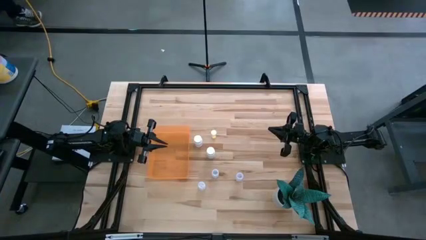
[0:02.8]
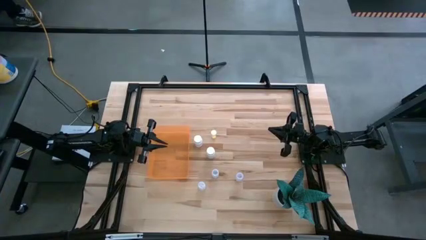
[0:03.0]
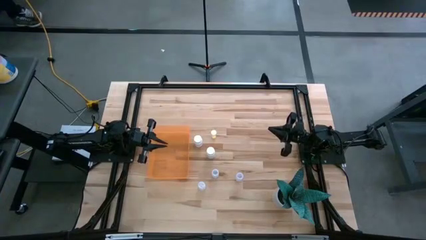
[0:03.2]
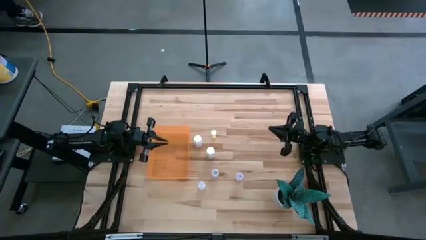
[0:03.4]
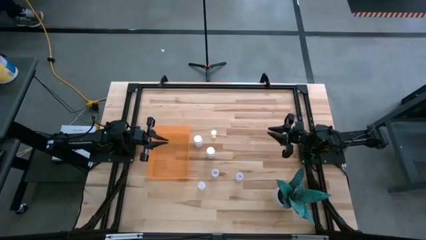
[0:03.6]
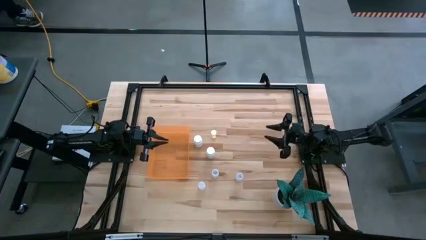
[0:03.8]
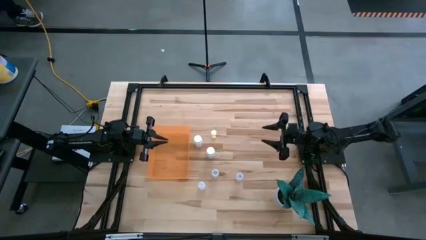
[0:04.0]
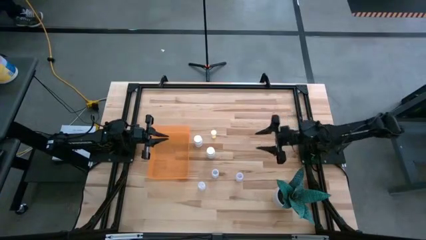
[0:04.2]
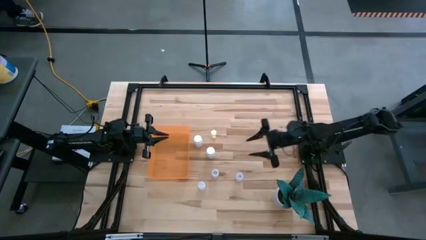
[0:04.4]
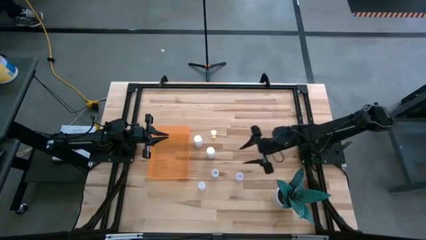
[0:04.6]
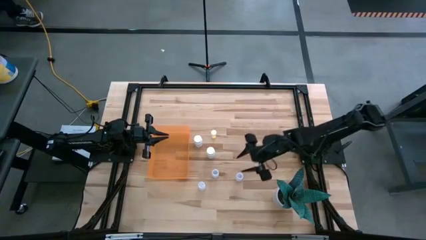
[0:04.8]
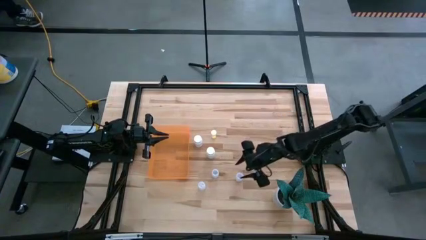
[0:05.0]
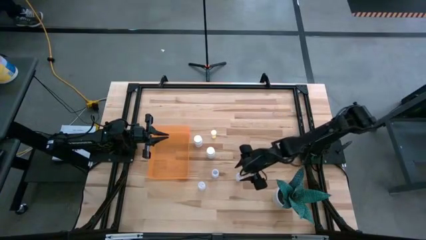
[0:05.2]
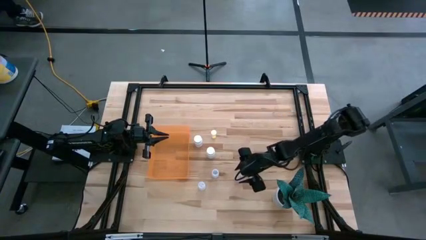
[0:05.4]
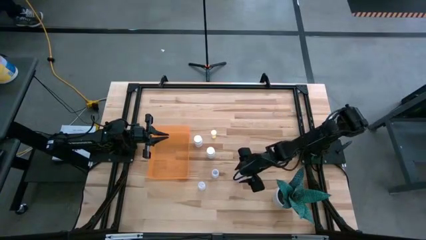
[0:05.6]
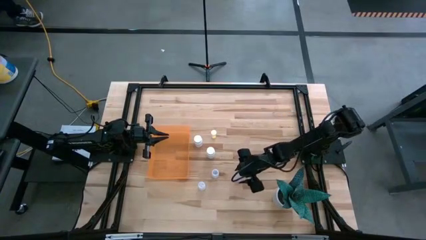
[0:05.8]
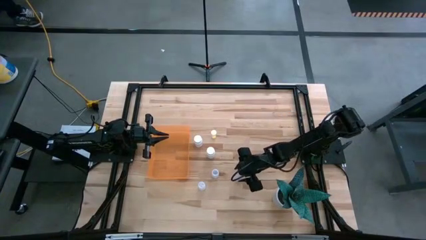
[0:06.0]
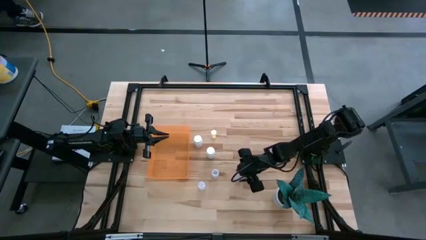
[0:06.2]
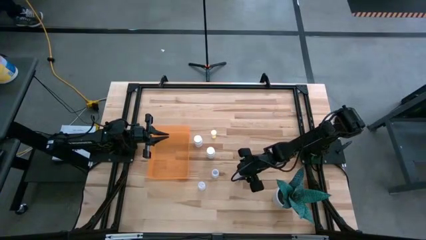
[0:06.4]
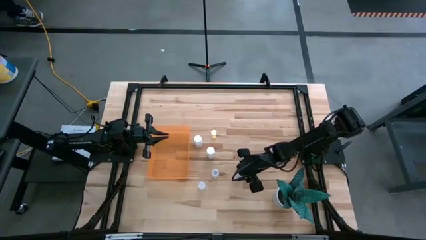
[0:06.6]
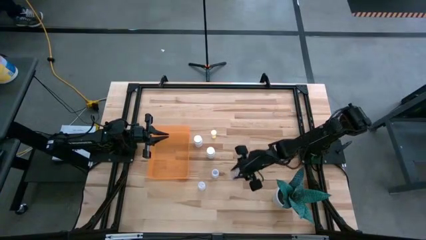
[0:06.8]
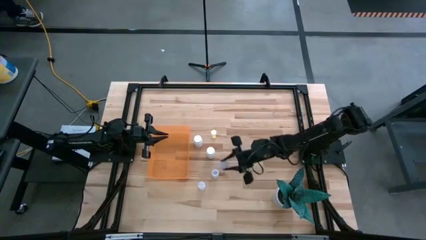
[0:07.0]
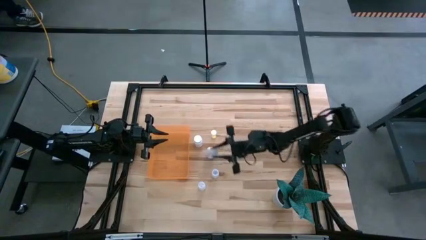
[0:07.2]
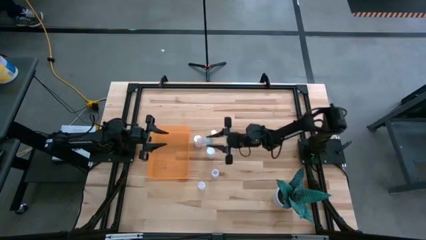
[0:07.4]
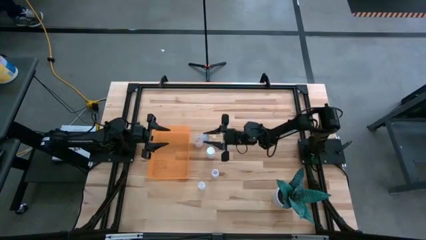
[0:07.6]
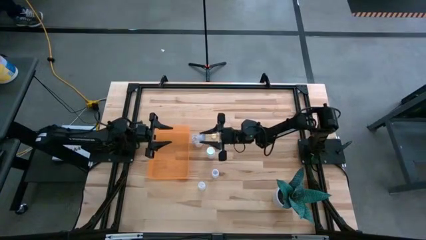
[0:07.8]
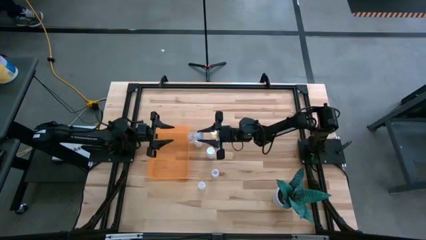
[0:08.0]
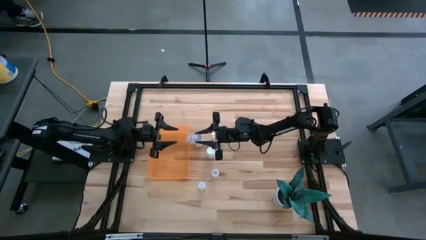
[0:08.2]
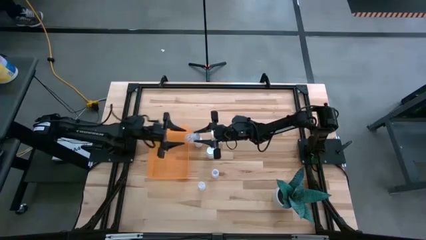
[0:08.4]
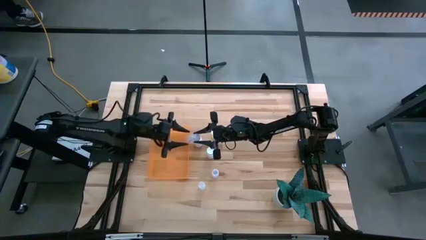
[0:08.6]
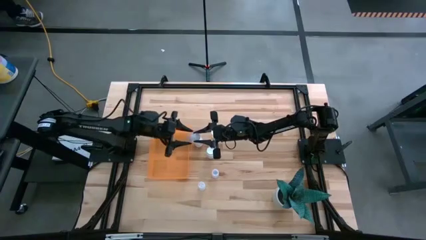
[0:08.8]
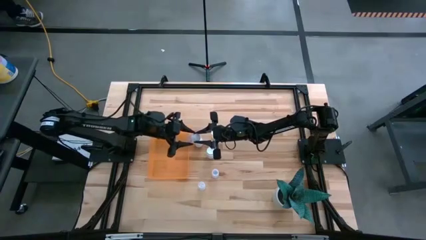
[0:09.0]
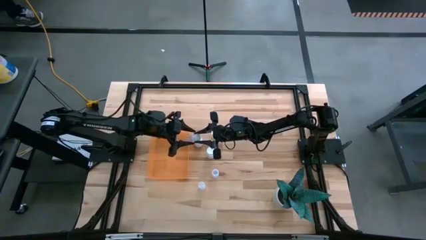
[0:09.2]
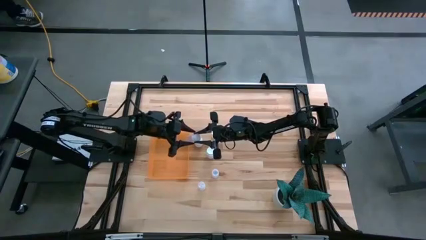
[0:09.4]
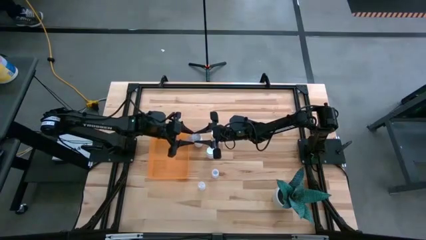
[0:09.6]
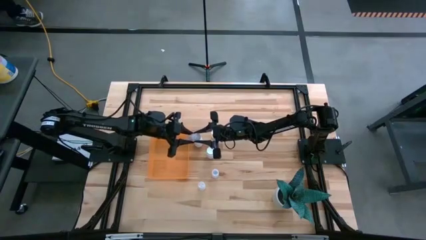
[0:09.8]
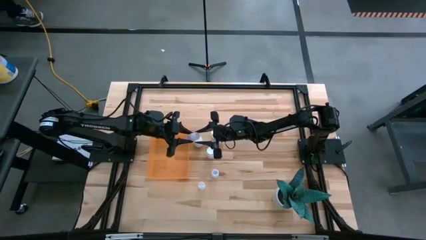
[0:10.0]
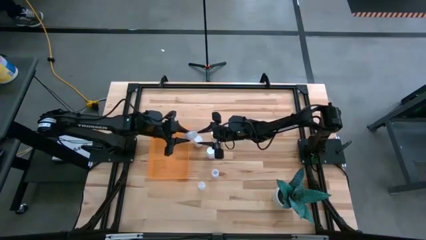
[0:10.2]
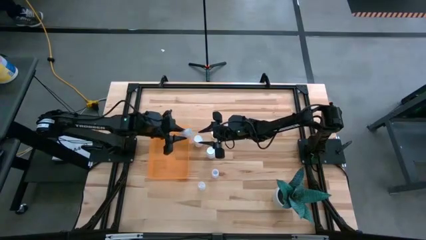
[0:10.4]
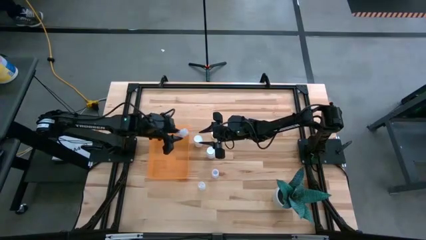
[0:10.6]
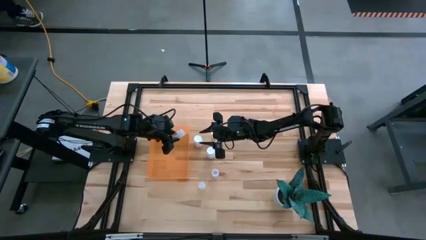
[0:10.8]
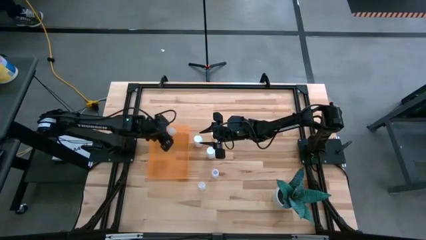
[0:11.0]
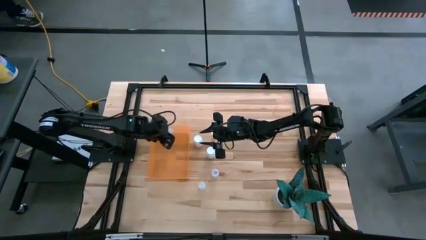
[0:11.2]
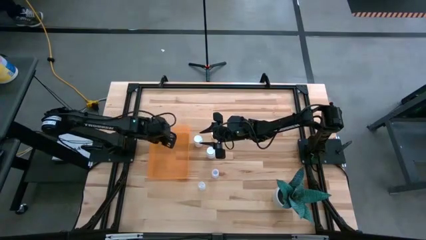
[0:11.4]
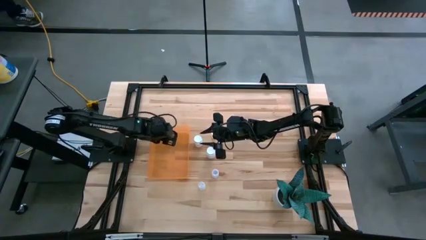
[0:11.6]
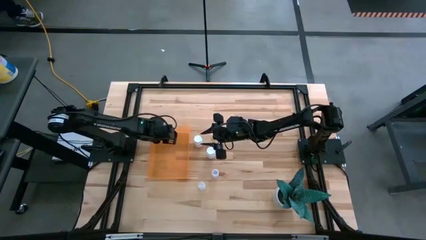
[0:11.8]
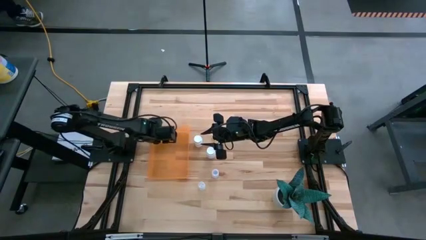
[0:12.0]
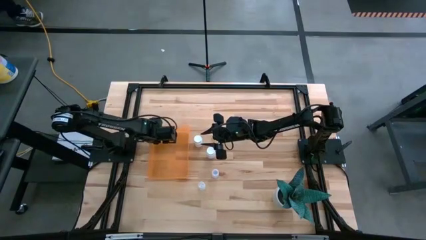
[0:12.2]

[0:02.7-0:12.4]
Task: Pick and place pill bottles into a basket
Put the top right transparent pill bottle into the orange bin

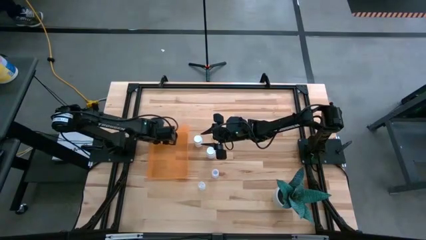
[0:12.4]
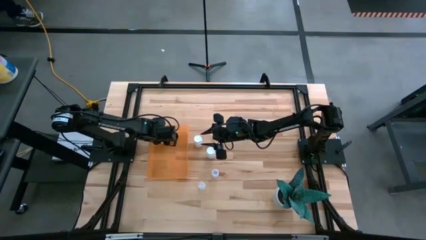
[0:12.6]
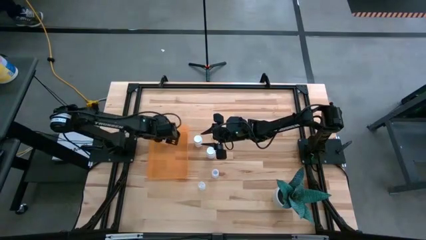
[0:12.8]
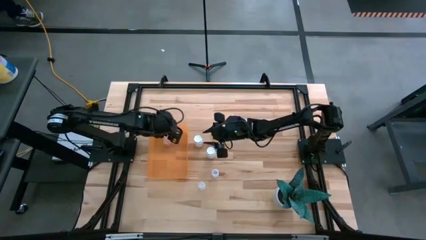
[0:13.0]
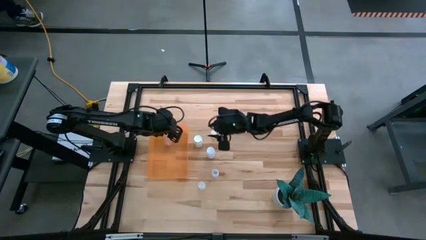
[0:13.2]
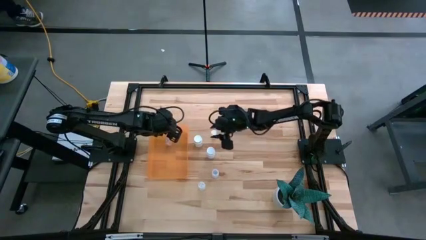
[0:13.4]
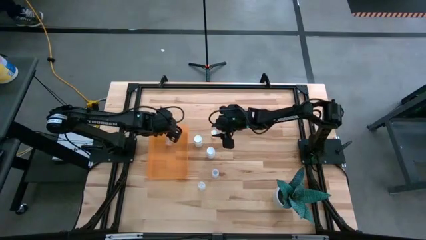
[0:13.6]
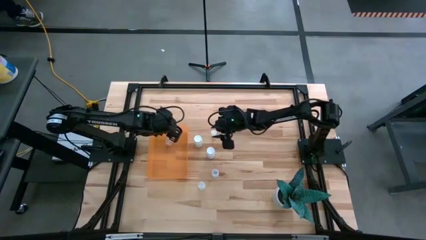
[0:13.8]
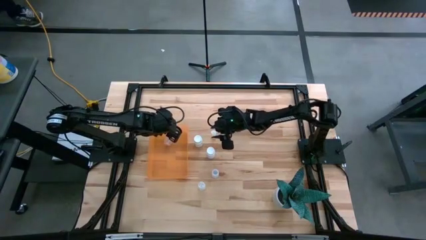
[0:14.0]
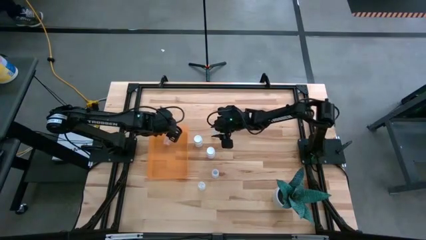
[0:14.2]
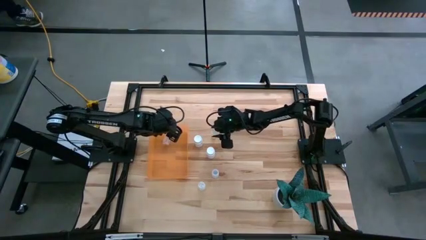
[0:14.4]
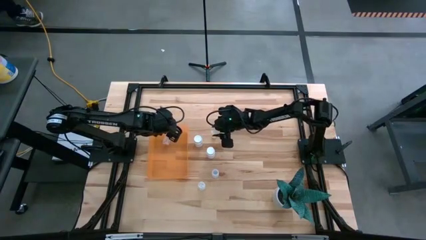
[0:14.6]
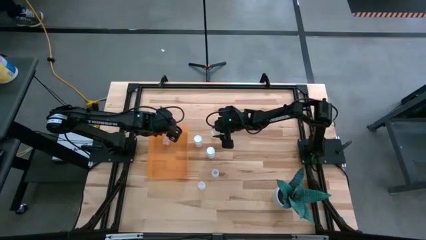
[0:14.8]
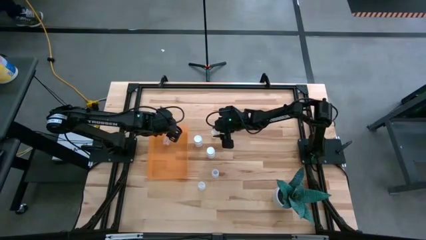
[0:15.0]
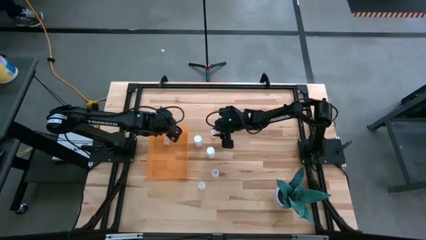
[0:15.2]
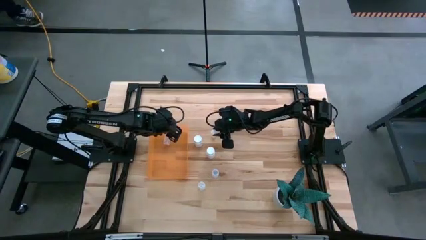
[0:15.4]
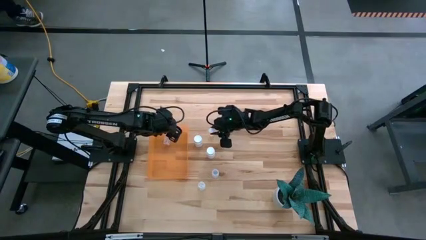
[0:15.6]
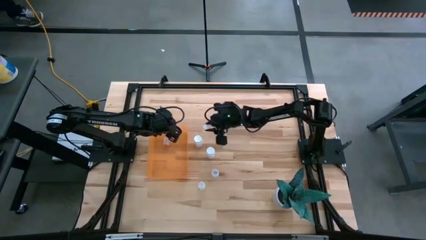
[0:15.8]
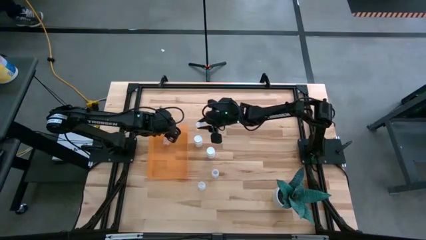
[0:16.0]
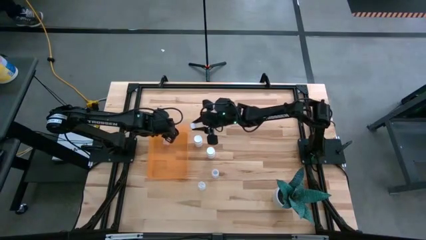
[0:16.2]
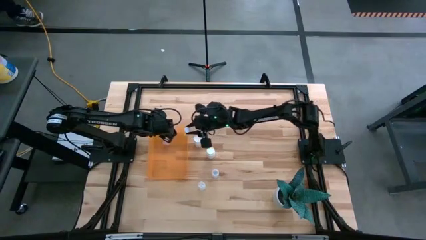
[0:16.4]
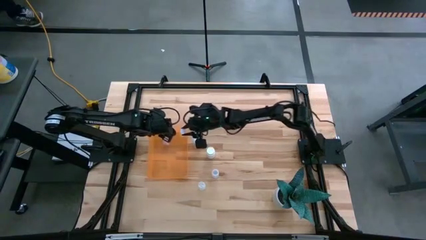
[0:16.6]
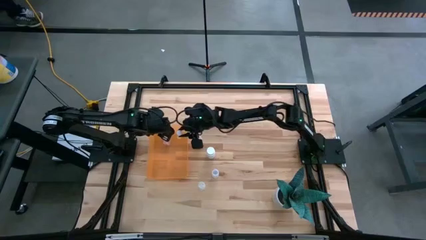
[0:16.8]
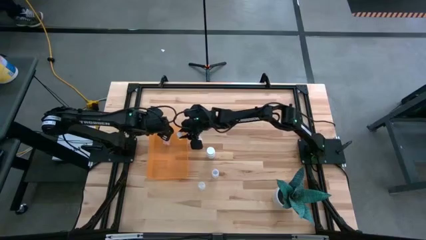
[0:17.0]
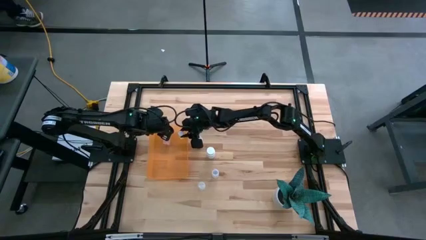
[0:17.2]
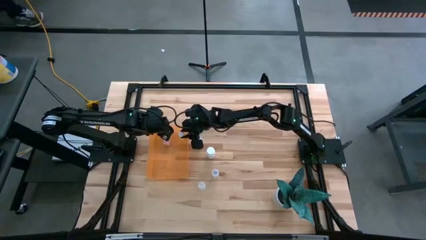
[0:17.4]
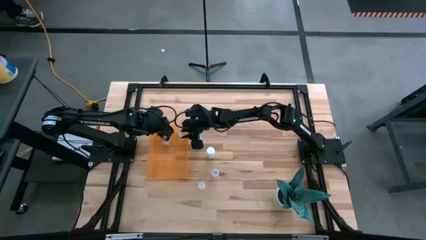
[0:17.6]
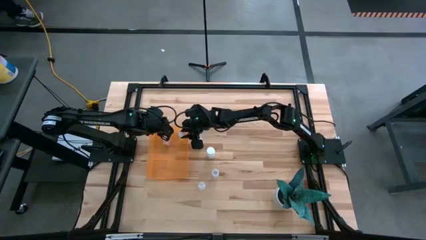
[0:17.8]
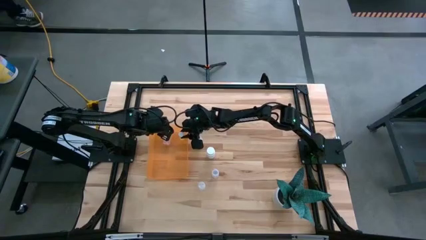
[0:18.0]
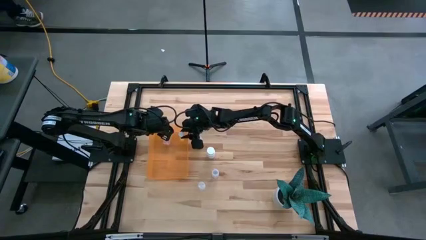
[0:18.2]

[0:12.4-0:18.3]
Put the yellow pill bottle into the orange bin

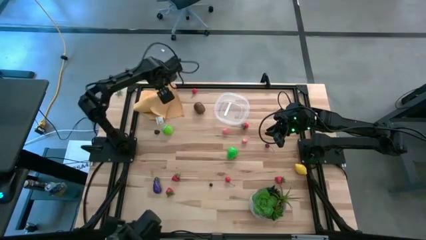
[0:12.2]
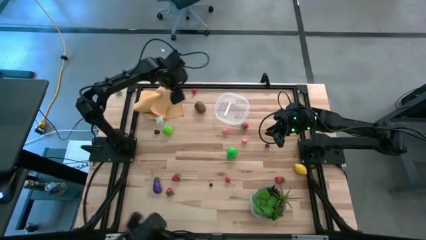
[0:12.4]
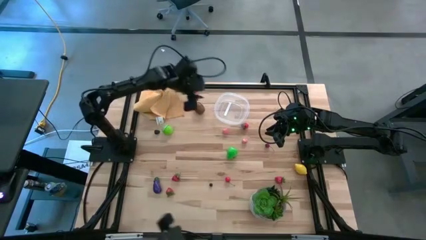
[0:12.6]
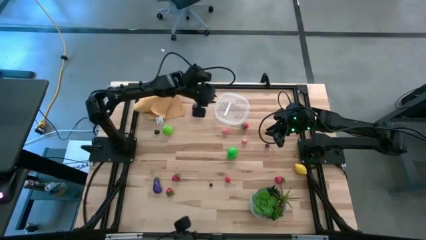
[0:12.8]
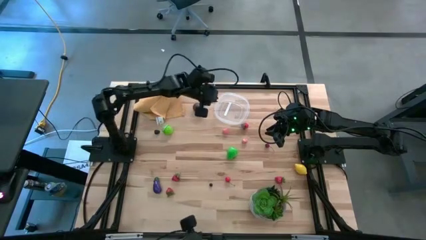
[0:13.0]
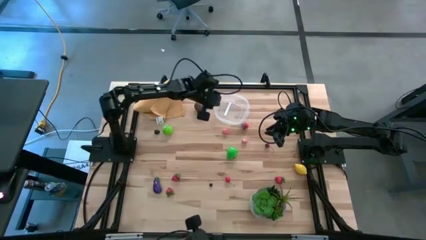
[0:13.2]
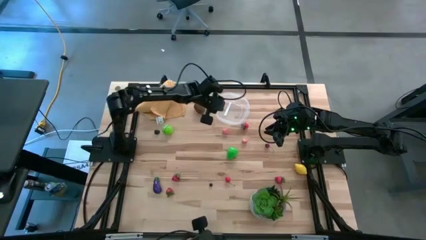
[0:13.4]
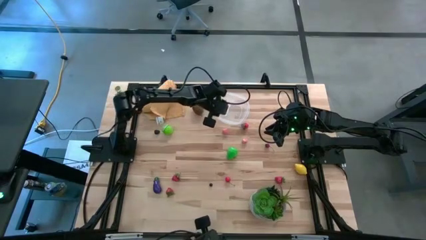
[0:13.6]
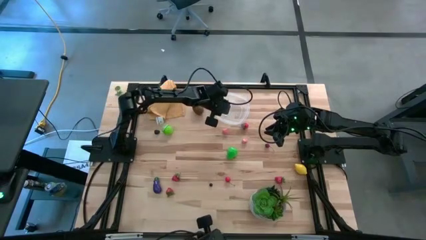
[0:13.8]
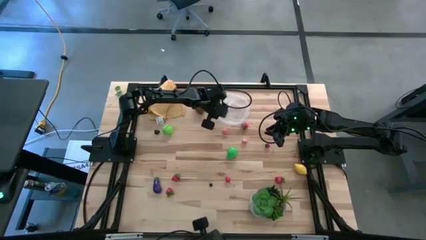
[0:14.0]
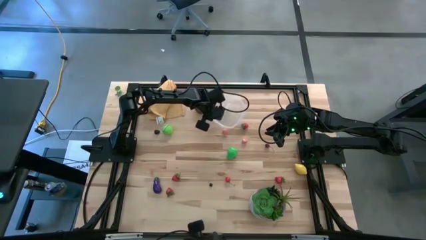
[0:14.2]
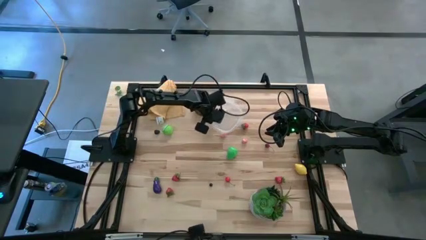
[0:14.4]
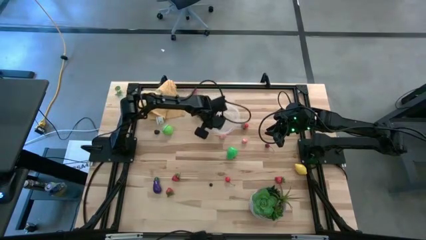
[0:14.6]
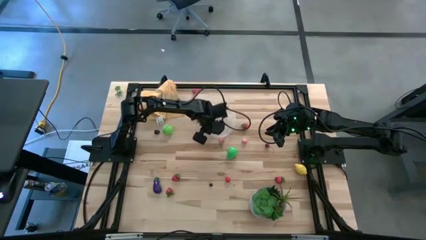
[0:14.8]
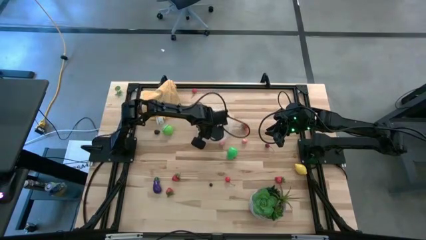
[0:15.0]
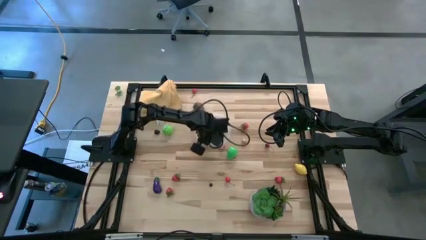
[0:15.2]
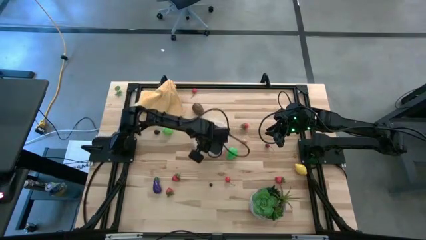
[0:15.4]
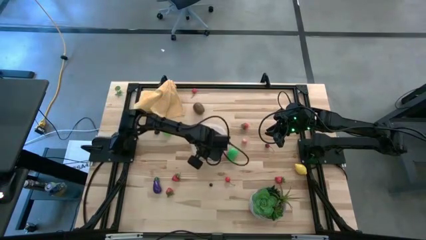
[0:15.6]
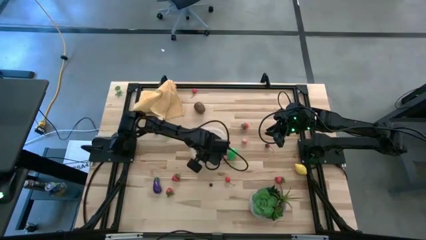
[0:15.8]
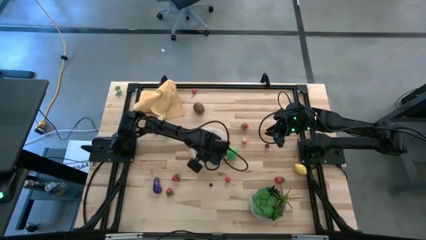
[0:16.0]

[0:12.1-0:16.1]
Task: Pick and placing Produce into tupperware
Move the bin to the center of the table
